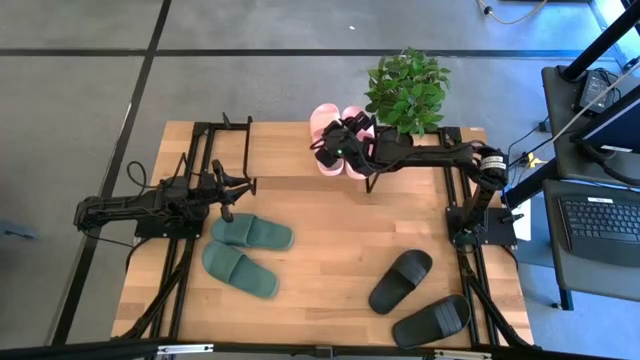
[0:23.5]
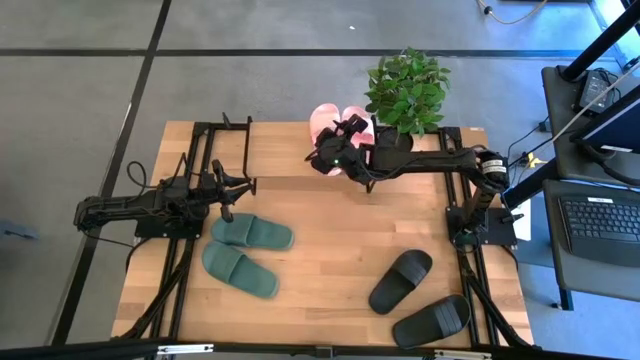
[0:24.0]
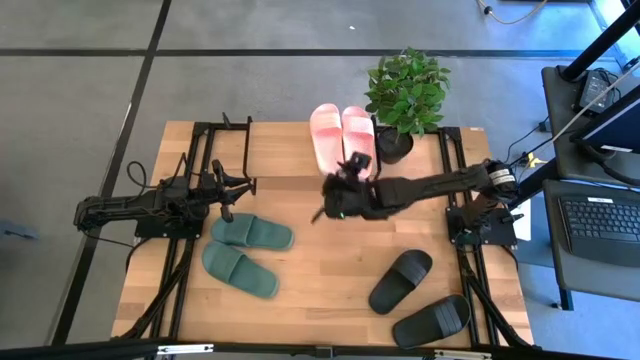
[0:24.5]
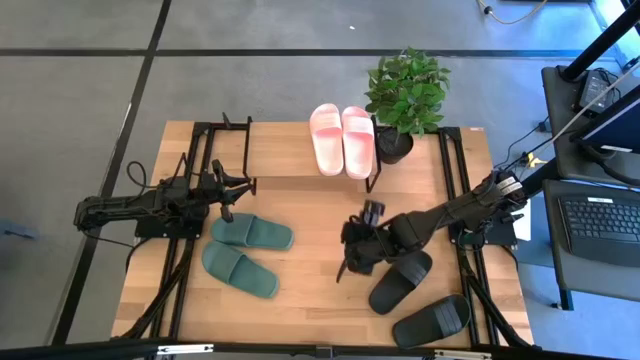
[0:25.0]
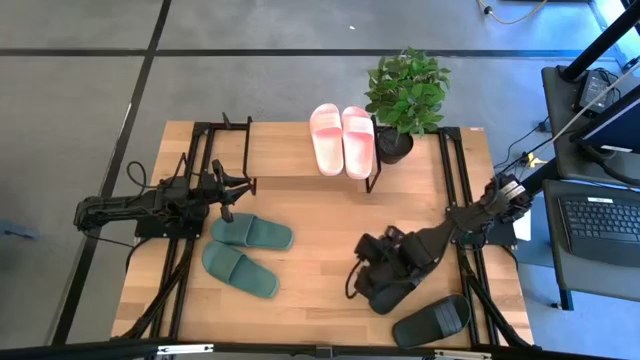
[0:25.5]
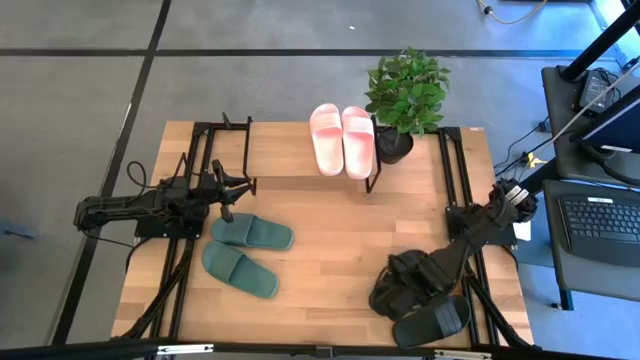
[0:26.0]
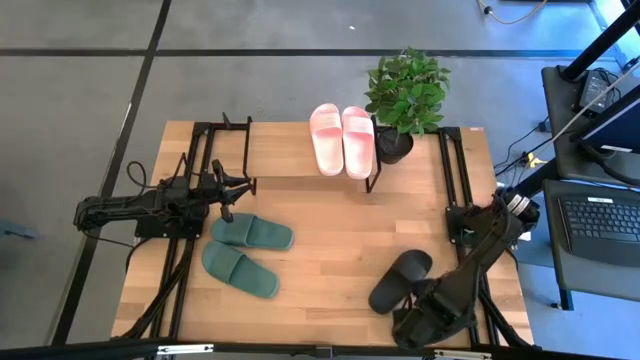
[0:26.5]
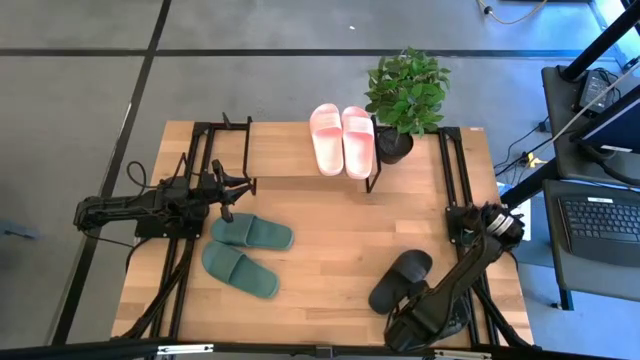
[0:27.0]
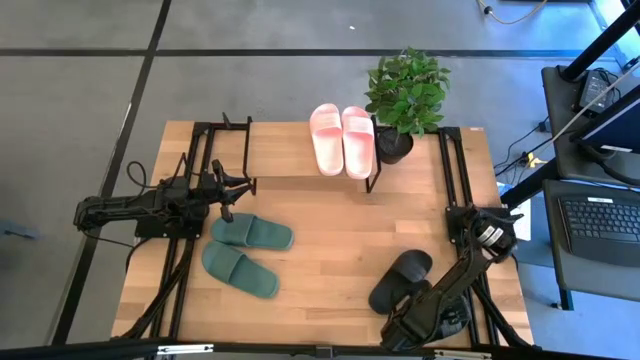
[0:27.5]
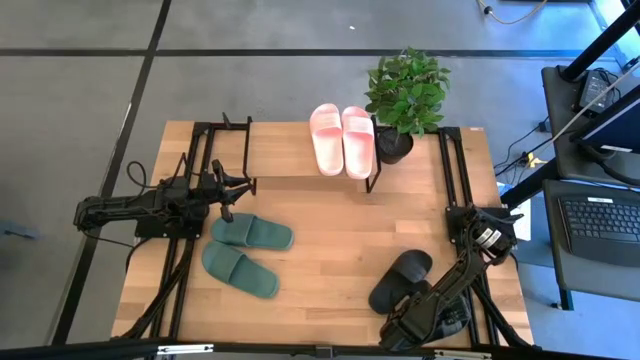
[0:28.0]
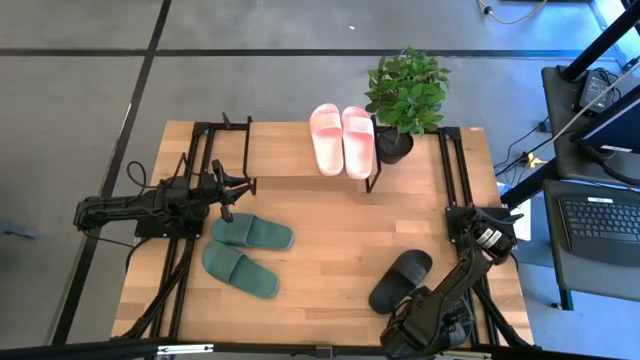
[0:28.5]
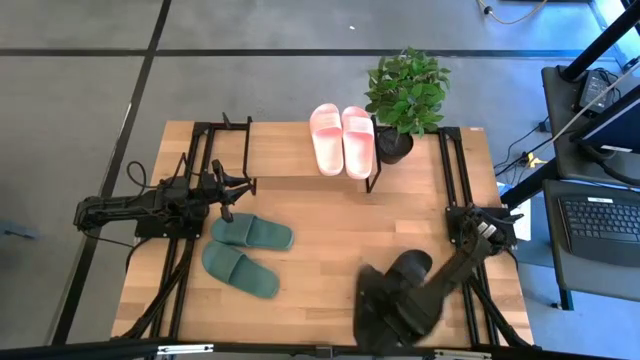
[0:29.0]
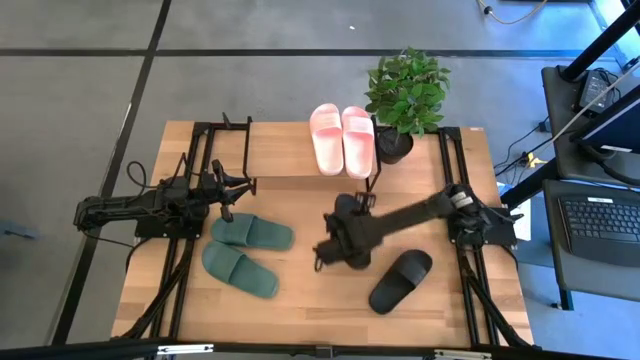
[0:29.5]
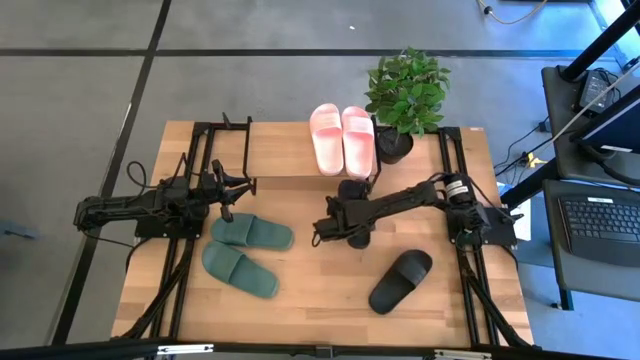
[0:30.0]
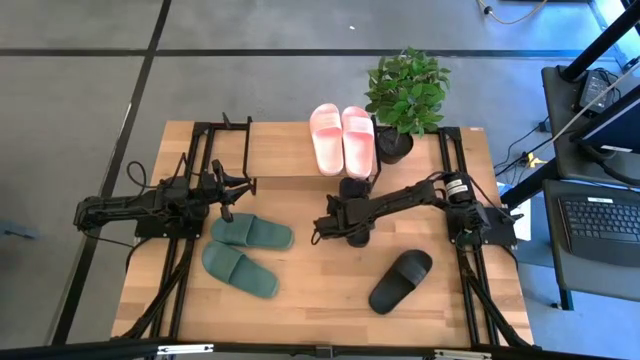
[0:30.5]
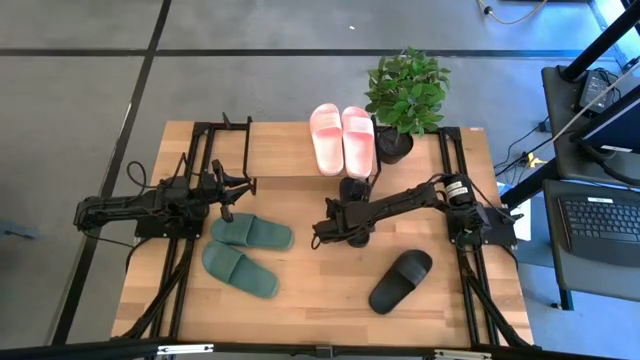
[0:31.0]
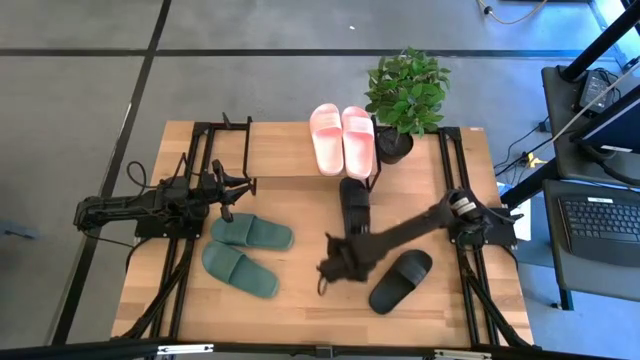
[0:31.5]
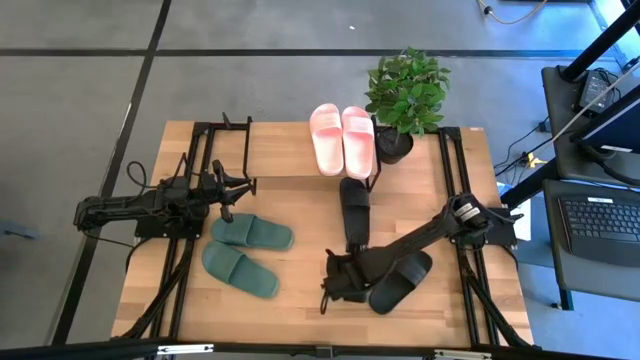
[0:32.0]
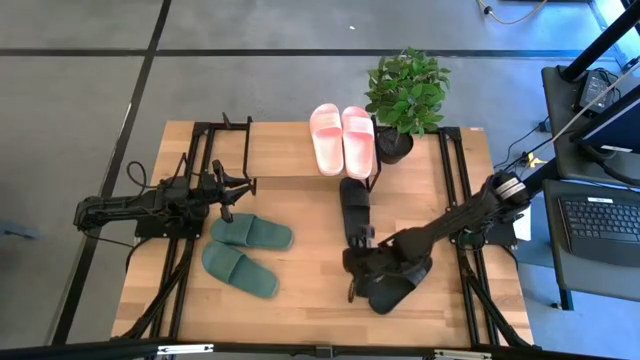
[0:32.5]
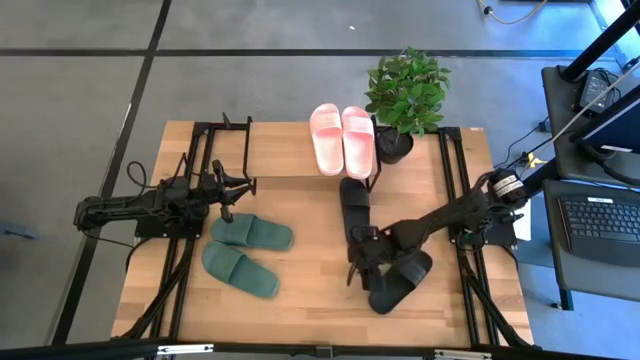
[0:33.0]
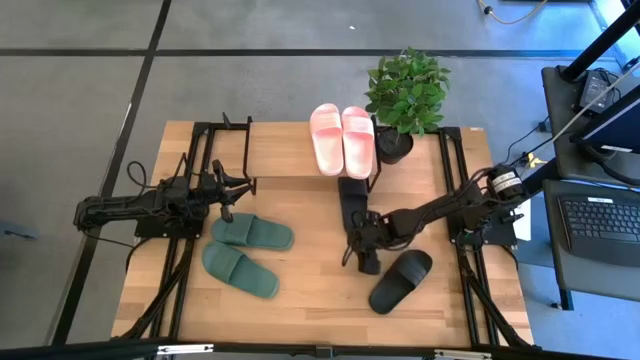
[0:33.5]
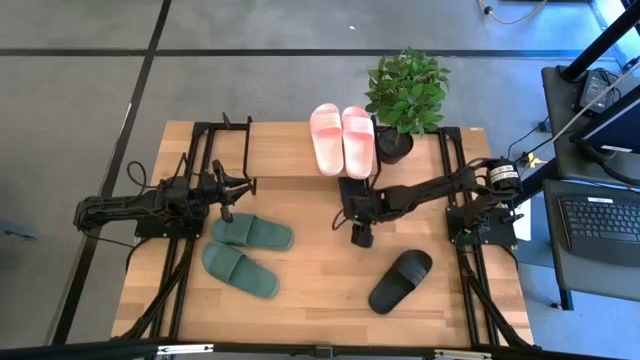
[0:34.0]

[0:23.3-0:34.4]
Task: Pick and place slides into the shelf
Put the bottom black slide under the shelf

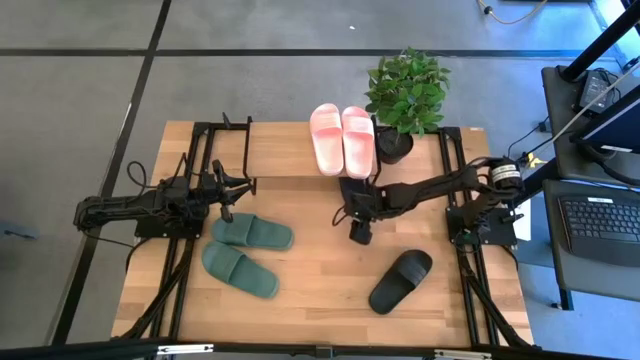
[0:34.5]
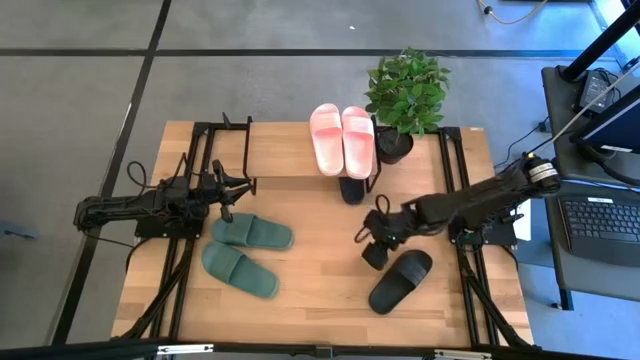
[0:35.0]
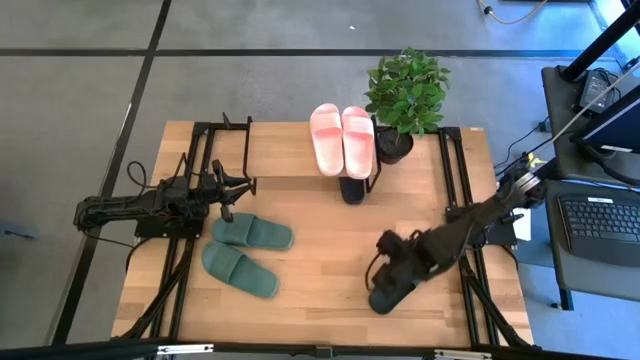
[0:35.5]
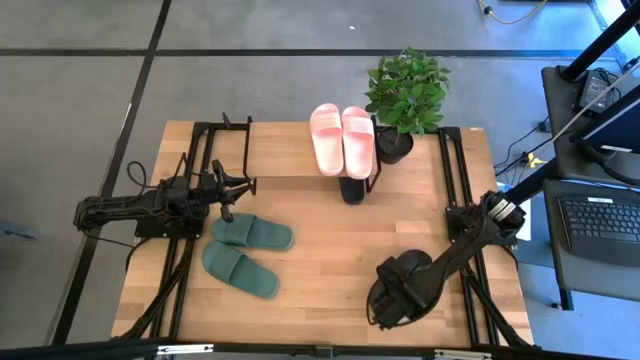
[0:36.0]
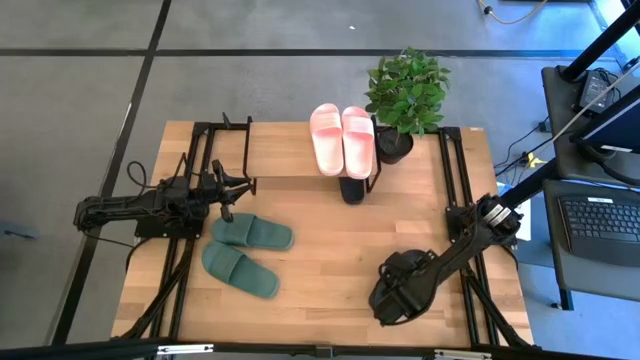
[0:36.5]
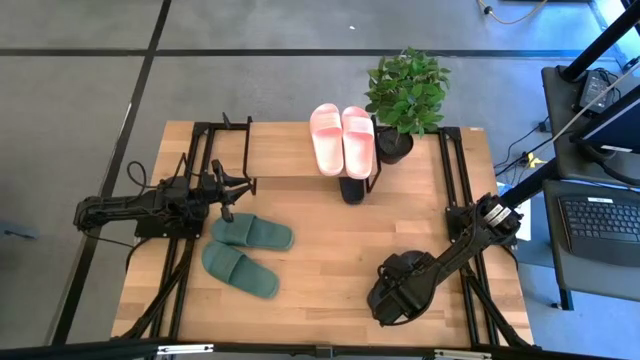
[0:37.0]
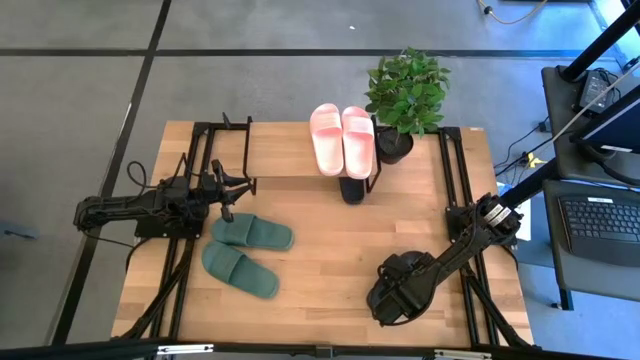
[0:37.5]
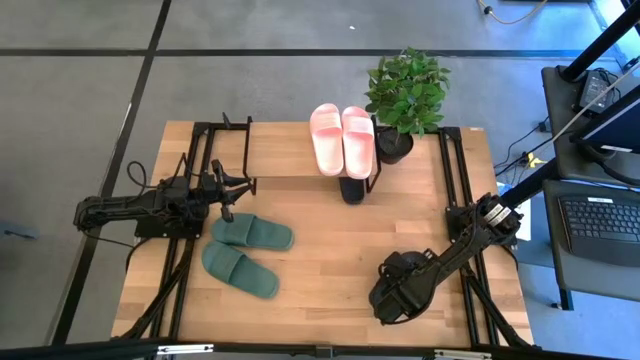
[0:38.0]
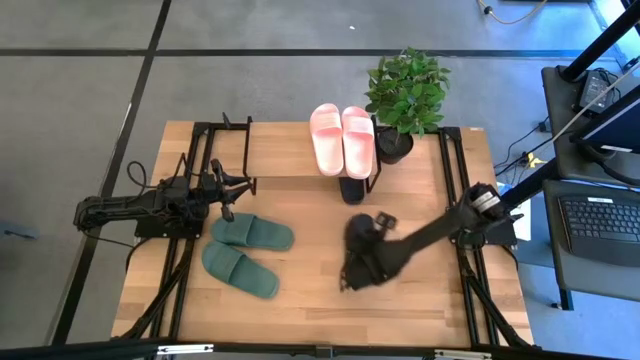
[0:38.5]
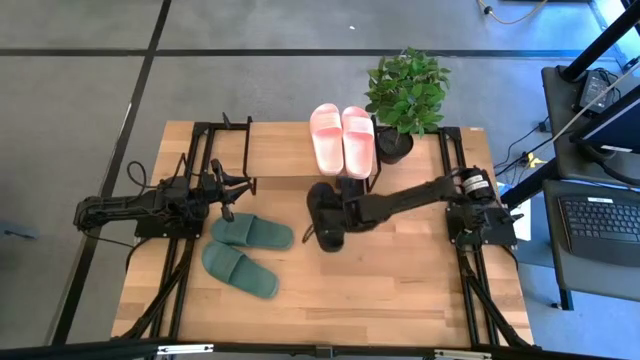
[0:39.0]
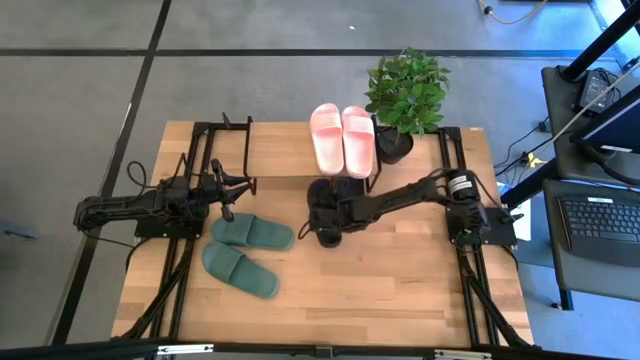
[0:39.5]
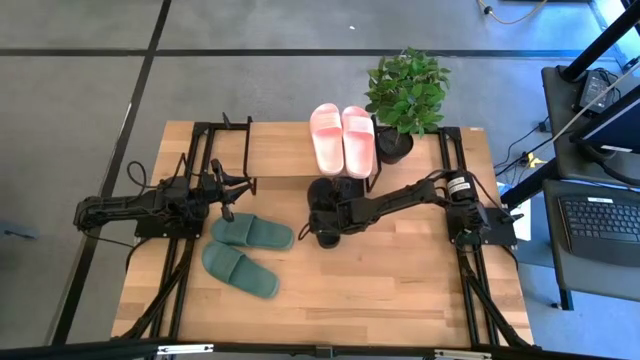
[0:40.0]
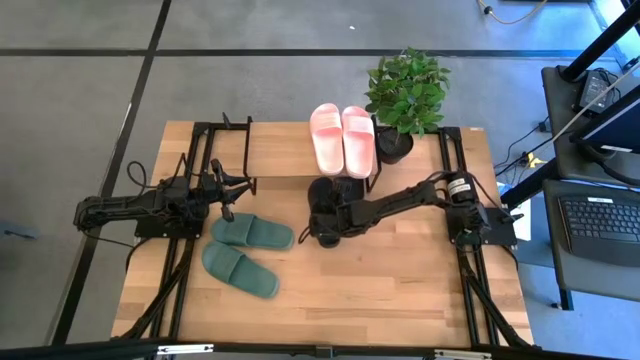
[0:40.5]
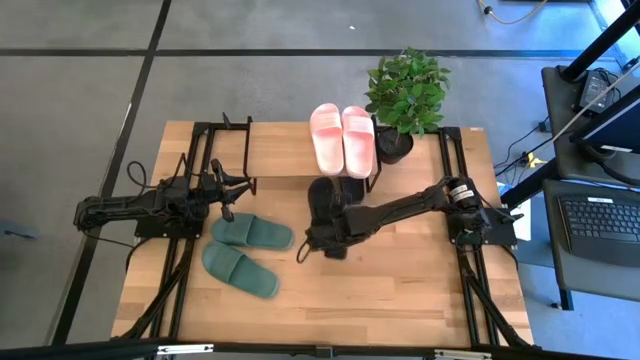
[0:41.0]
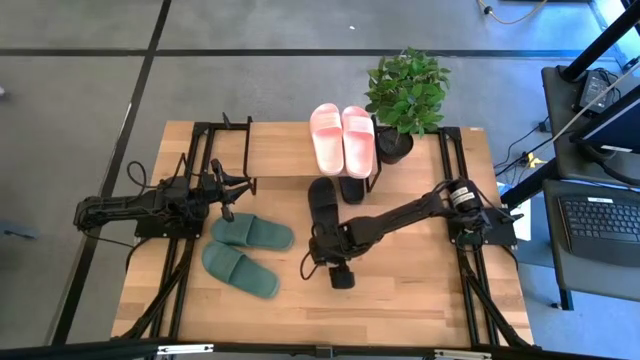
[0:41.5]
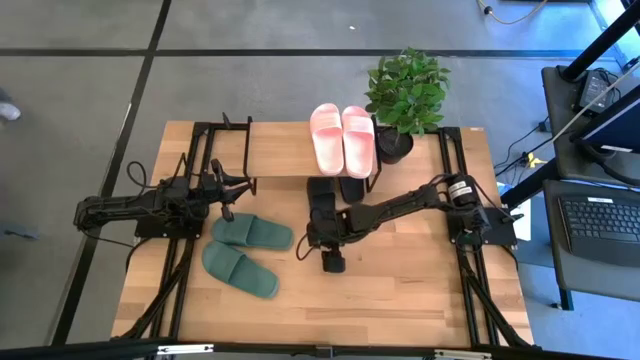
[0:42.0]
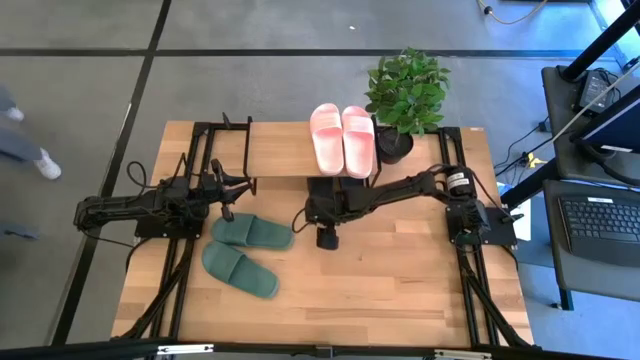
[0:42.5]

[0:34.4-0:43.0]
Put the black slide under the shelf

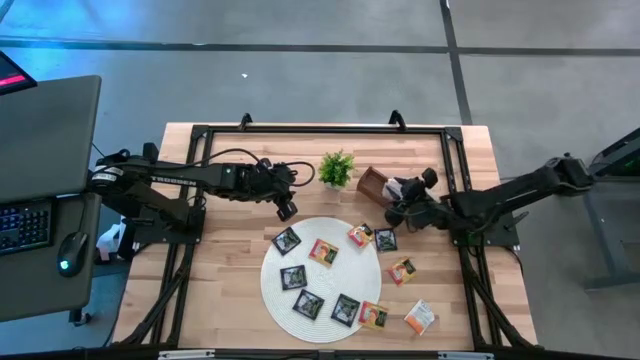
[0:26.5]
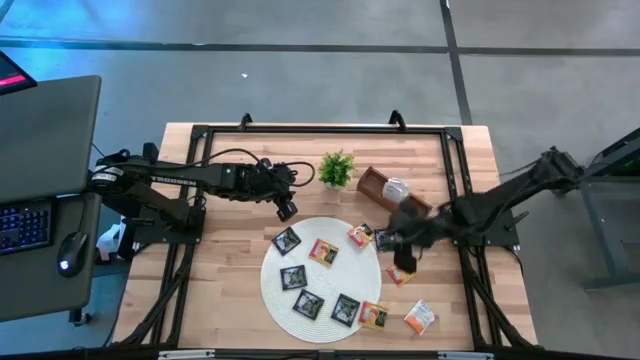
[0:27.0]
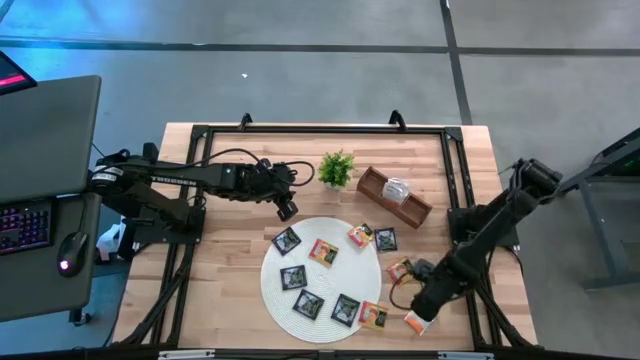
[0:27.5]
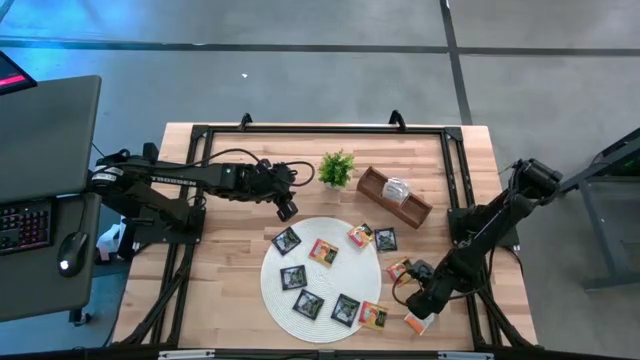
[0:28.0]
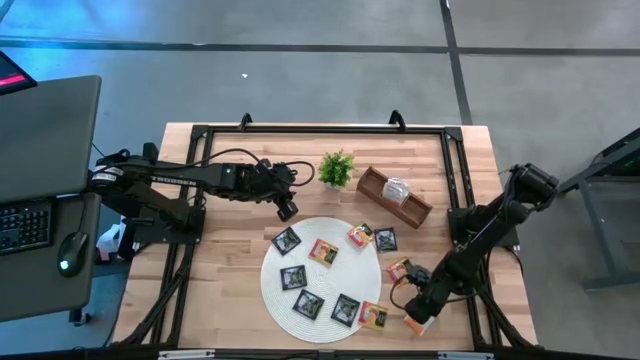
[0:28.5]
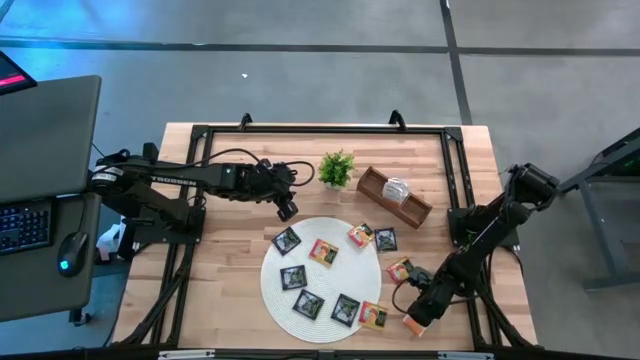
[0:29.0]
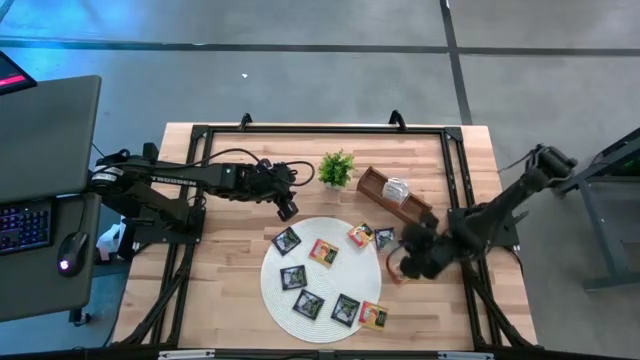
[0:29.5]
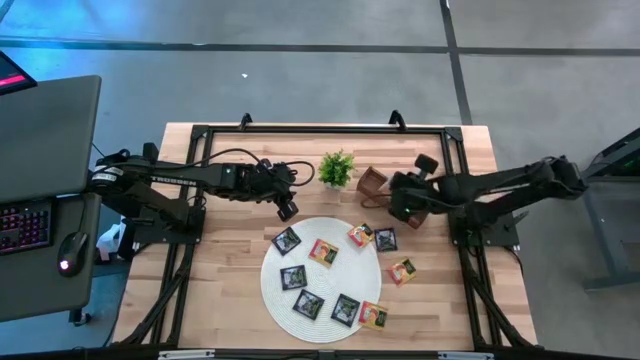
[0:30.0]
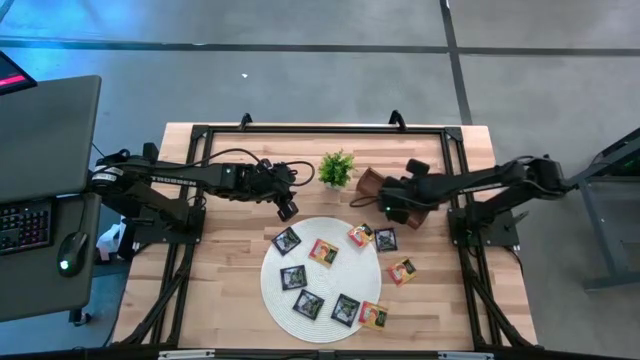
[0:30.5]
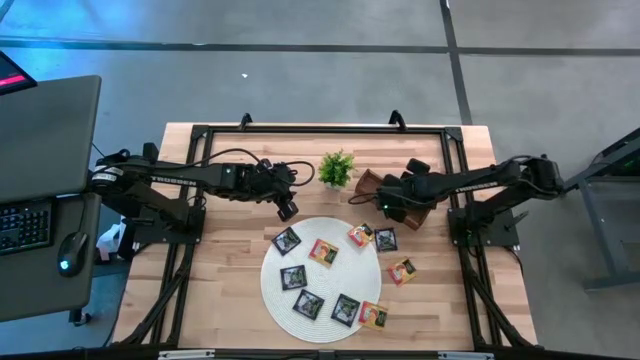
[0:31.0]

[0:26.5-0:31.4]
Task: Pick & Place Tea
Put the white tea bag into the middle section of the wooden organizer
